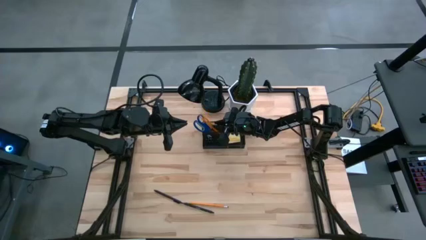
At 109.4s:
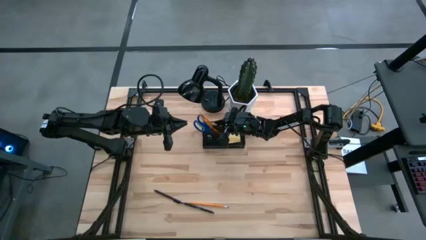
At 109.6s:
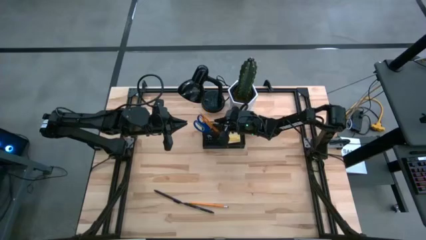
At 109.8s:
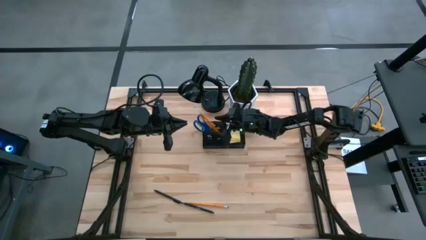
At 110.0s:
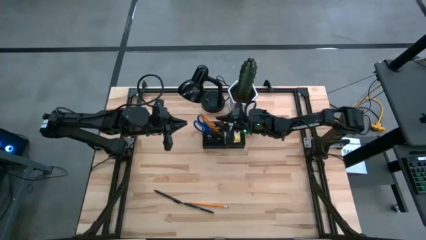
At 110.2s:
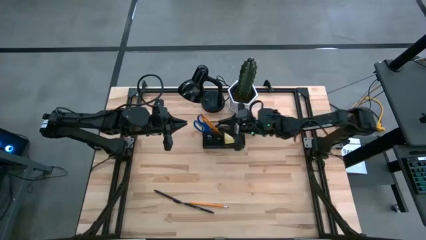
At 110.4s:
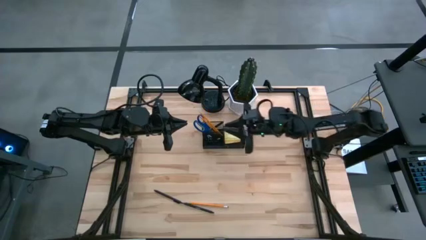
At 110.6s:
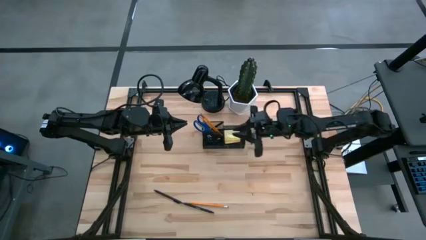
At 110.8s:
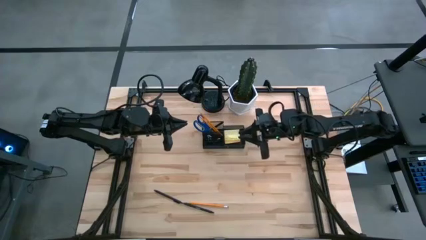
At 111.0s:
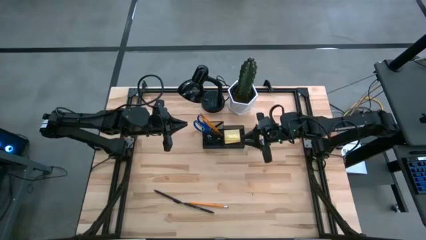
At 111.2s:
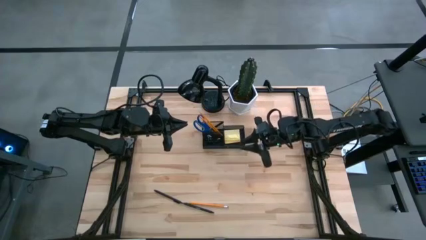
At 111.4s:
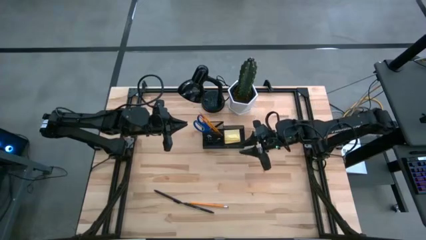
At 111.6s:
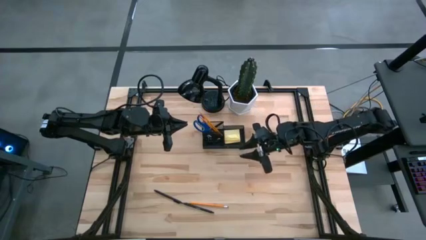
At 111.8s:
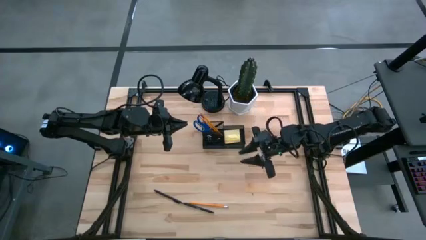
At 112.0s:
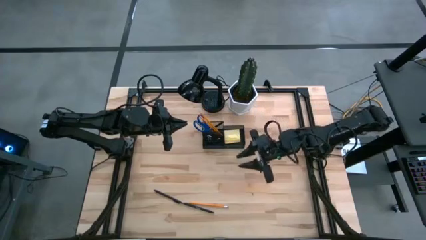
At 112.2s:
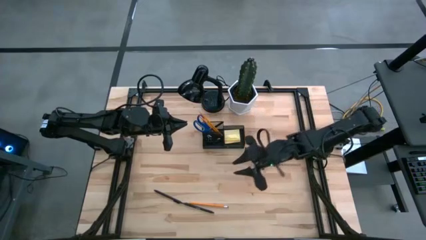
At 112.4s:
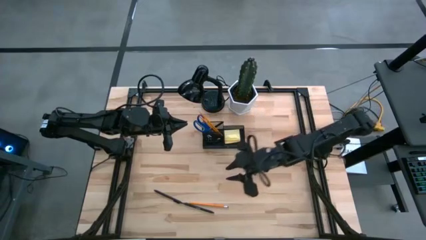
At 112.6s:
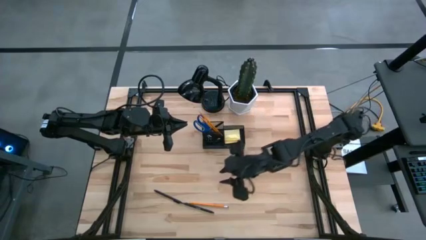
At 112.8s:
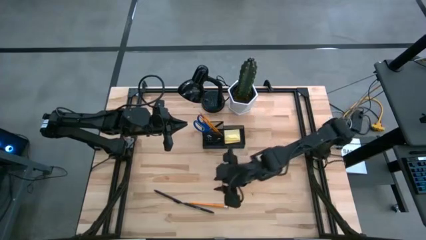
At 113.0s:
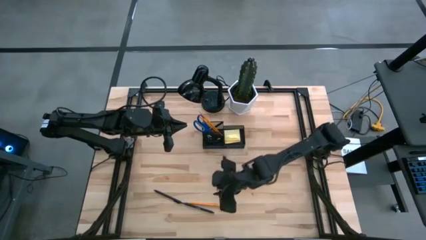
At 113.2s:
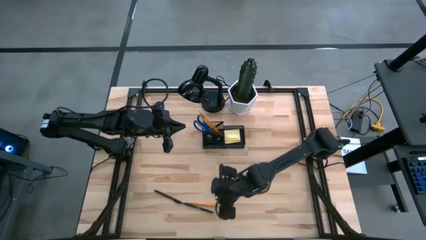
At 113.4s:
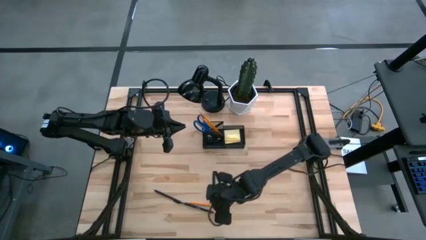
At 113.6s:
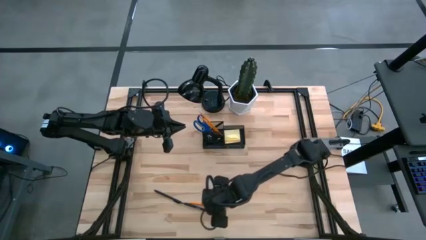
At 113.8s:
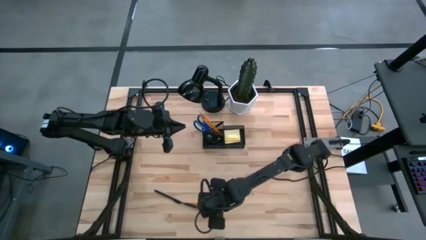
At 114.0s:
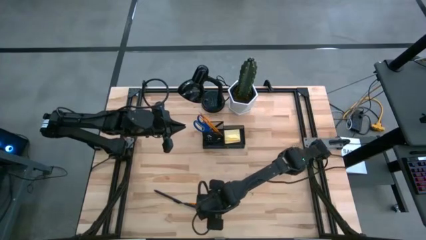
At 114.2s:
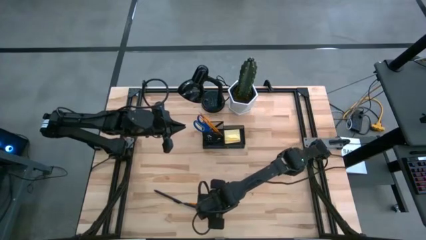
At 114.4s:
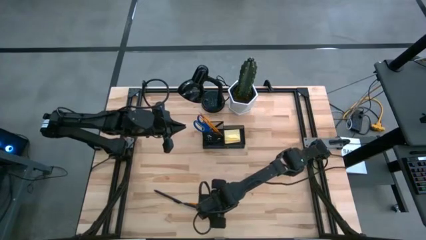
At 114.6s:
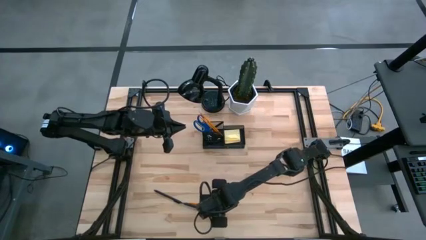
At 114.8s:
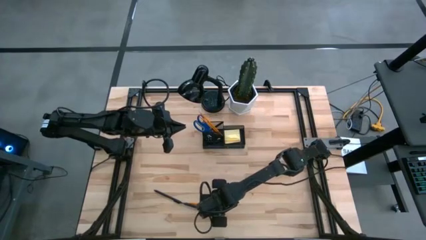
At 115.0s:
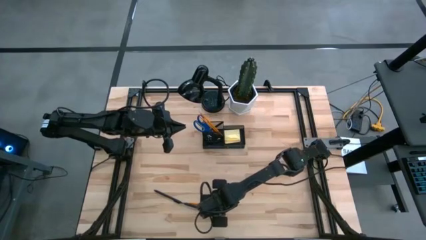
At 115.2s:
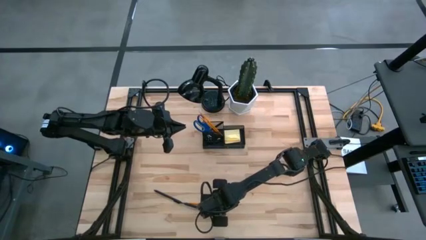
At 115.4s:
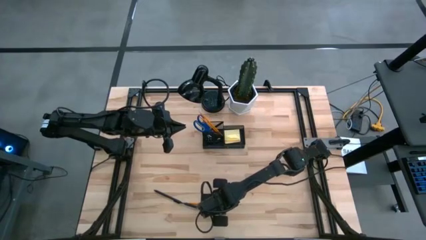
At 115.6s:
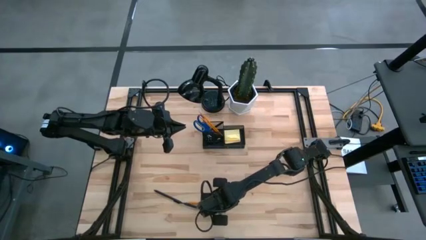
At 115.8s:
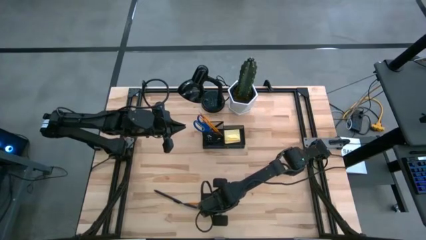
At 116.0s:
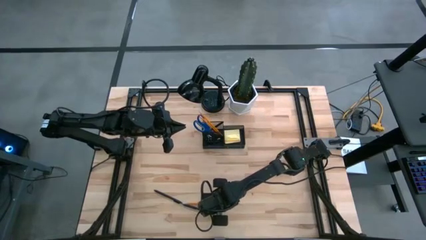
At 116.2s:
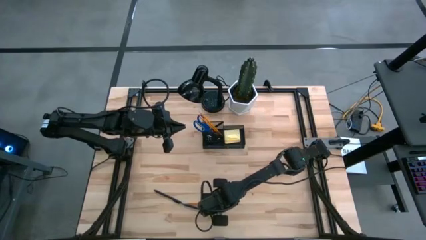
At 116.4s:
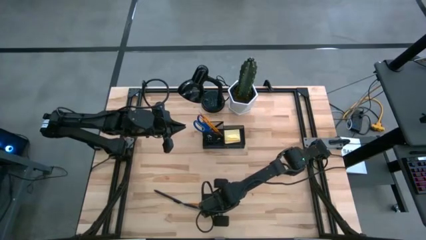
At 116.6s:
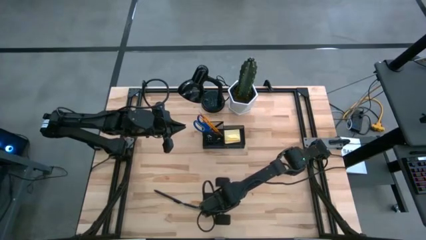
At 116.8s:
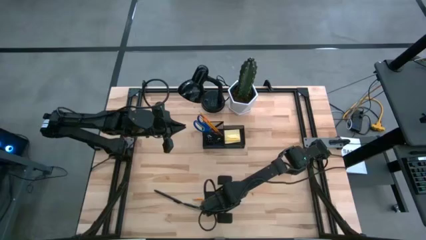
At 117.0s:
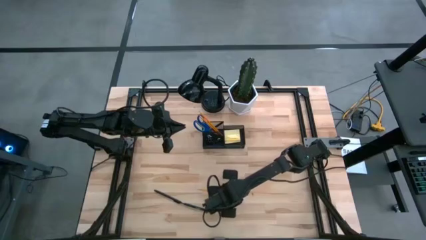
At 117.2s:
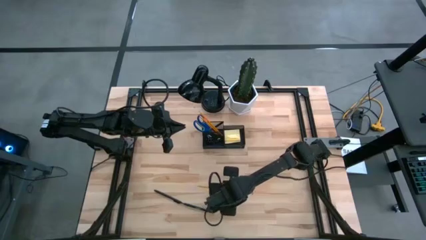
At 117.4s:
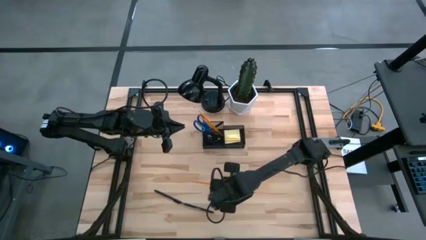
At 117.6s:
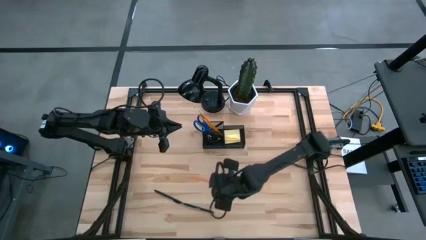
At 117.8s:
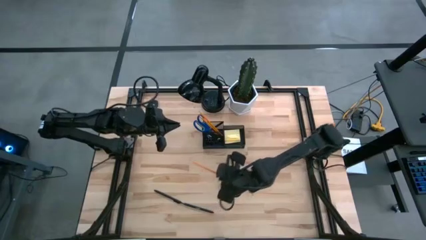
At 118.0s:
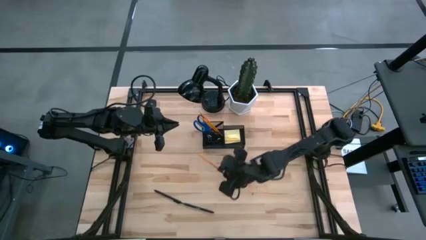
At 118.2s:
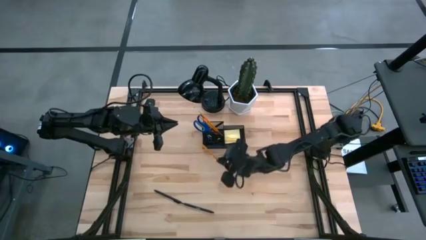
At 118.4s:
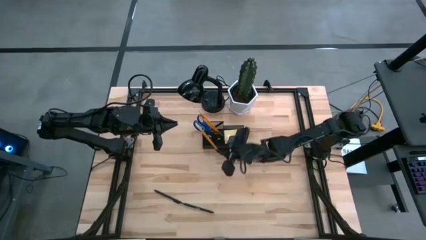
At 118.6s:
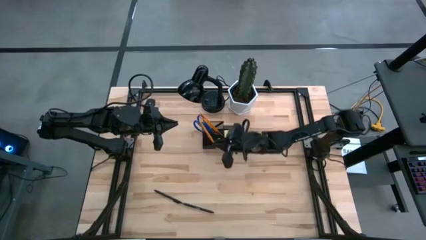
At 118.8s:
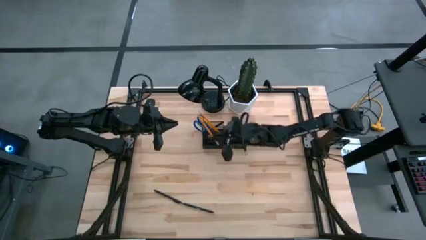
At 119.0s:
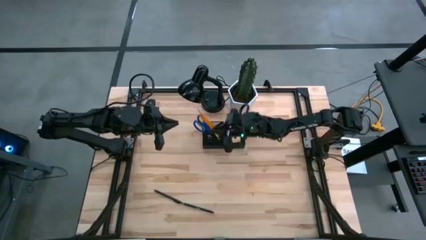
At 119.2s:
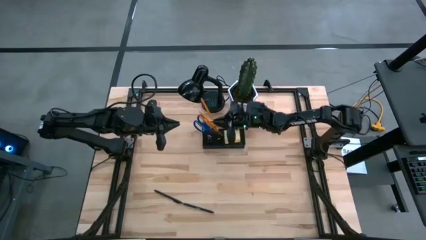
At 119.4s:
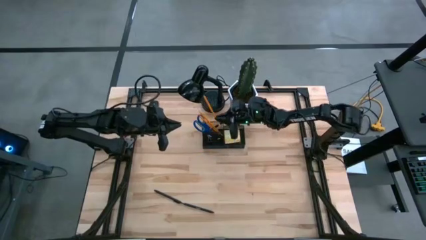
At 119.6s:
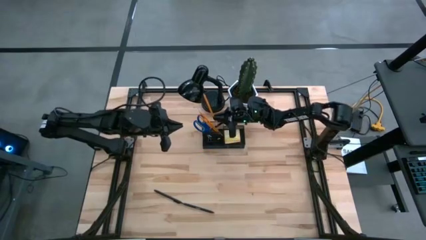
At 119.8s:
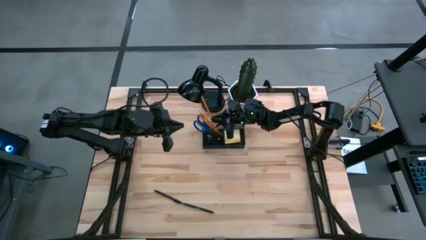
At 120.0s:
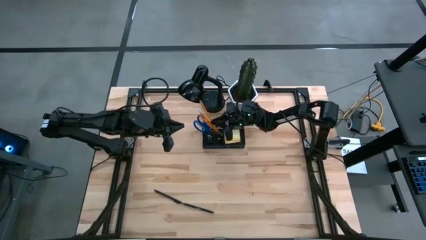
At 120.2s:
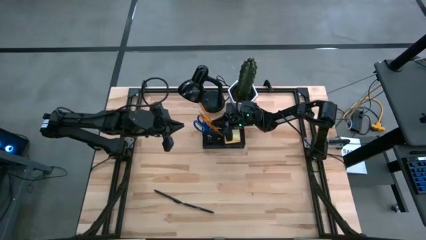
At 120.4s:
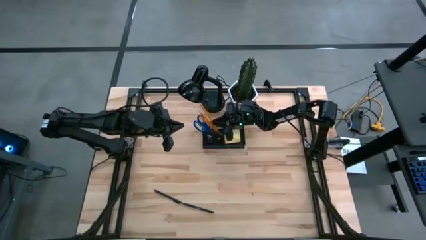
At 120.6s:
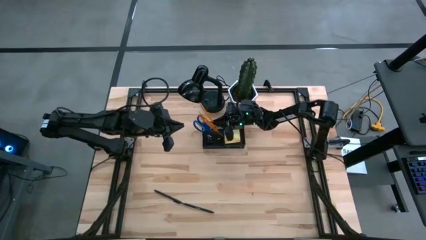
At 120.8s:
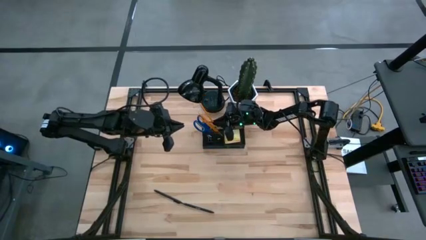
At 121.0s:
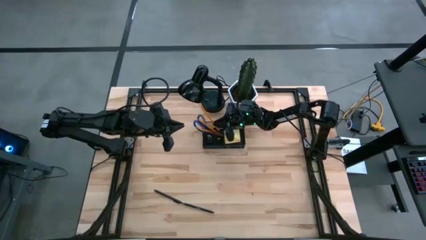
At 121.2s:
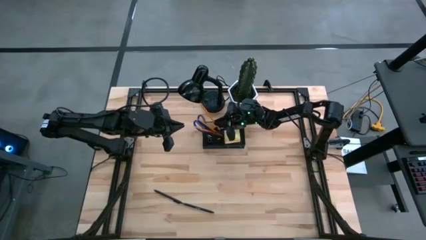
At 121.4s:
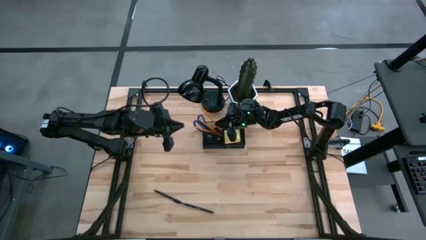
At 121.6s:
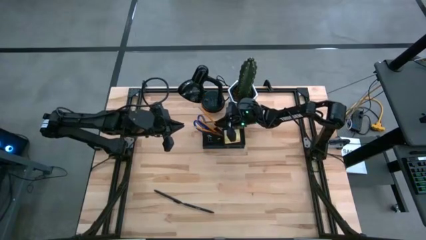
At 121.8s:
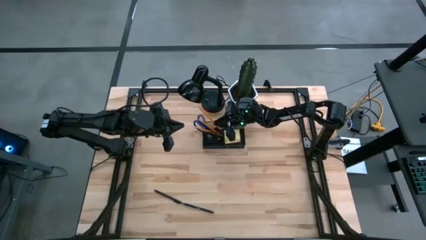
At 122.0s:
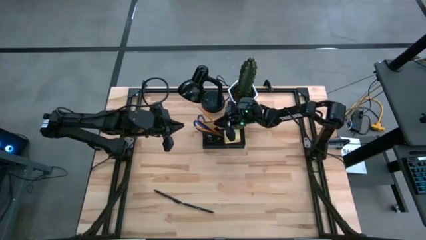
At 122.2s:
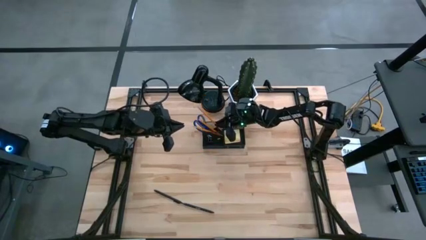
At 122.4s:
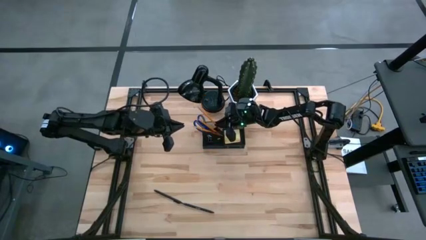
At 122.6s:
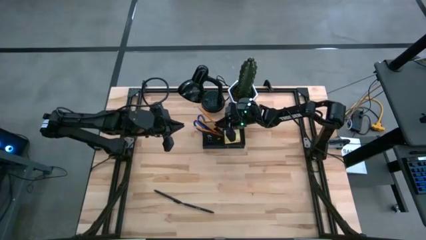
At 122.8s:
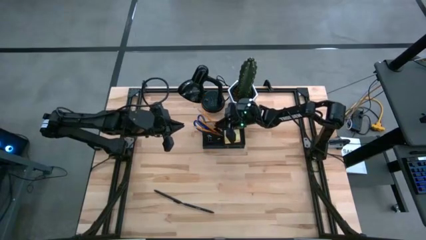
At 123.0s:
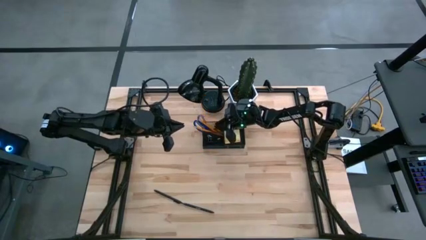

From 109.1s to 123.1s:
Task: Pick and place office supplies into organizer
Put the yellow pencil into the black desk organizer
